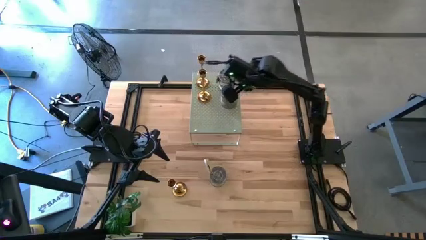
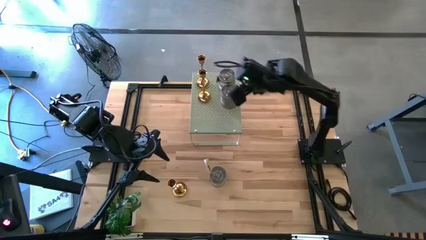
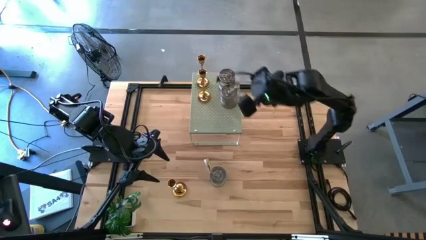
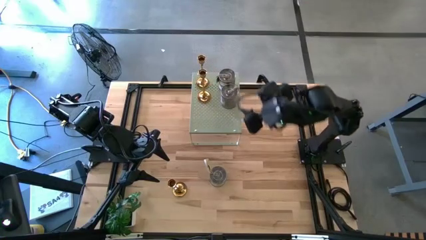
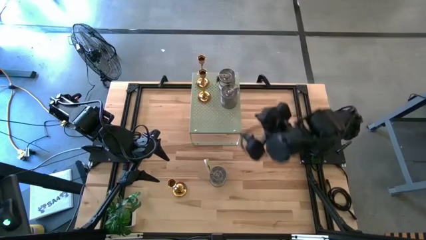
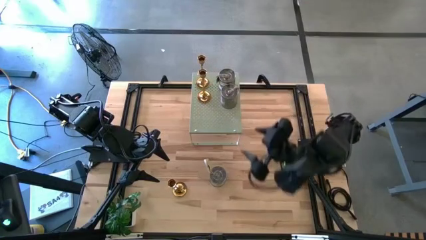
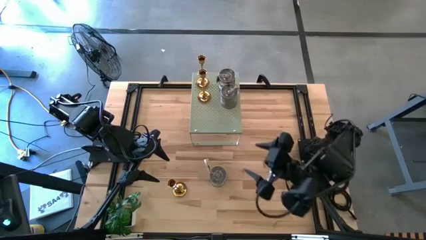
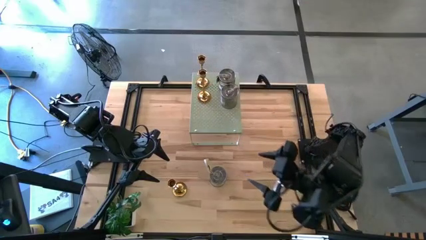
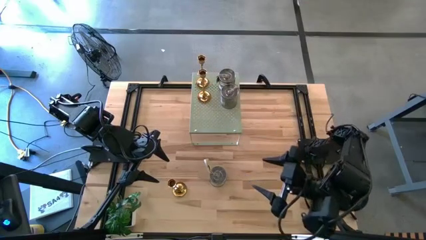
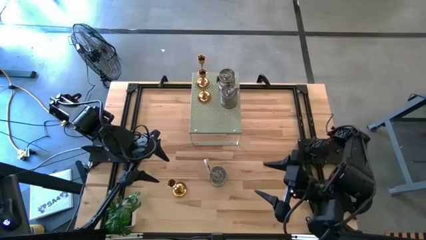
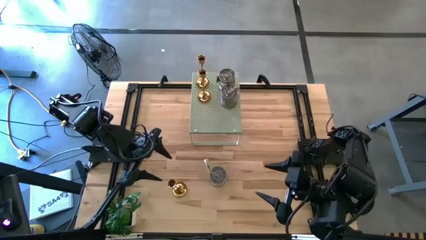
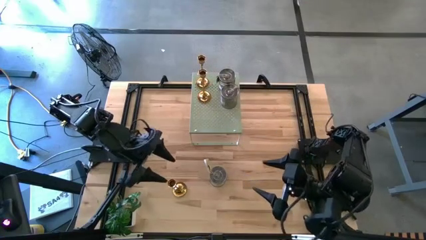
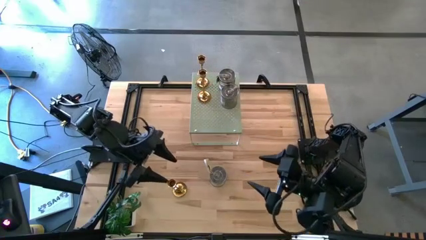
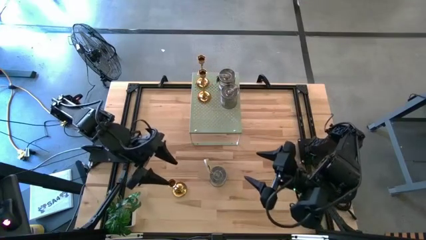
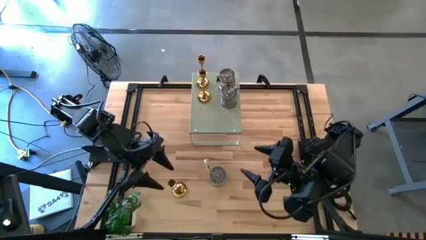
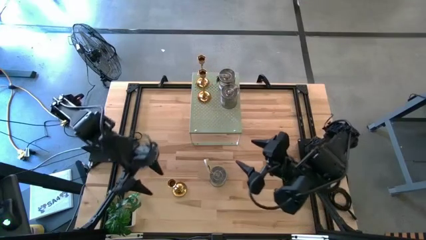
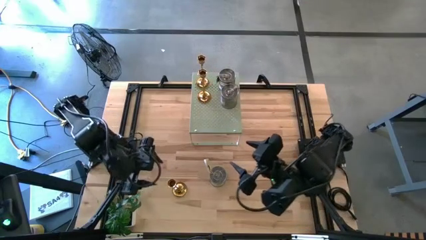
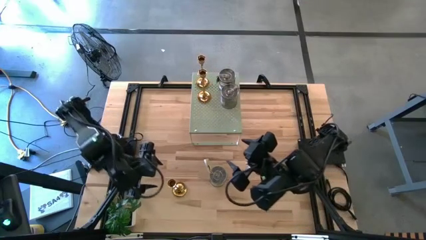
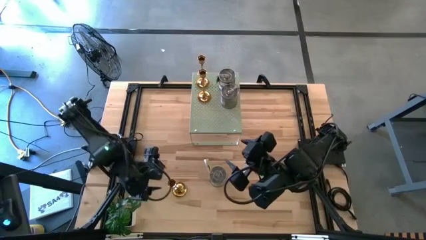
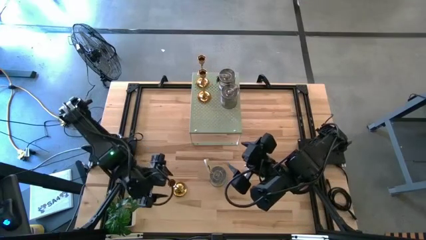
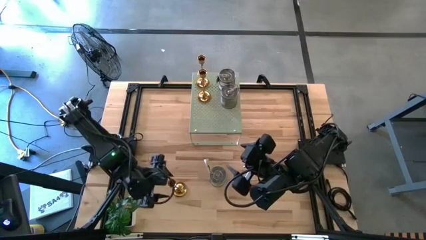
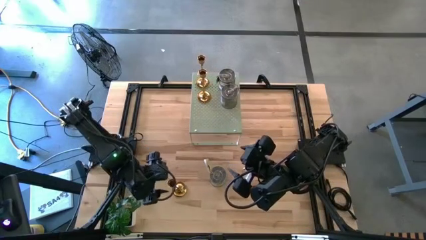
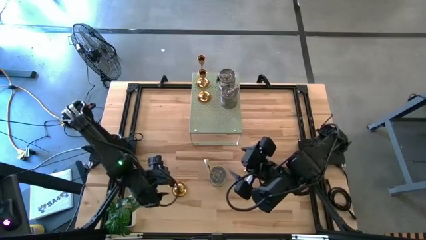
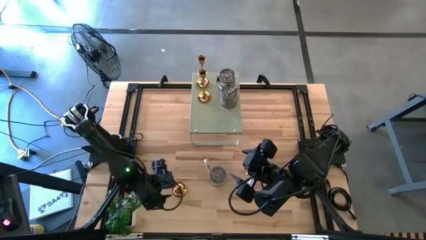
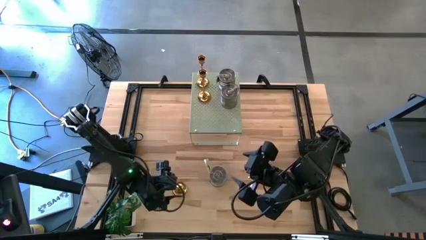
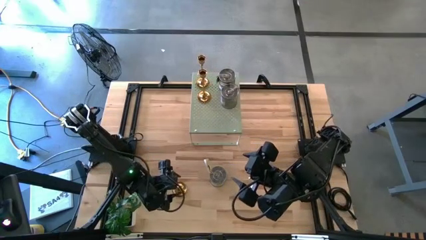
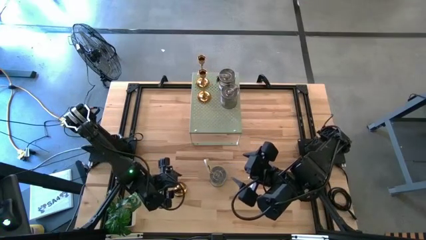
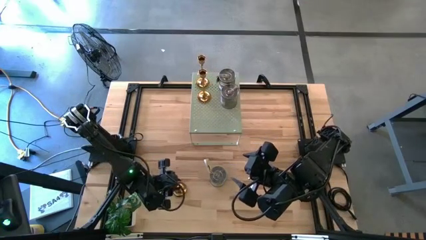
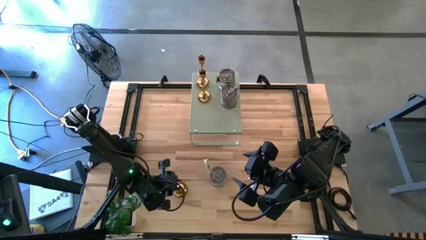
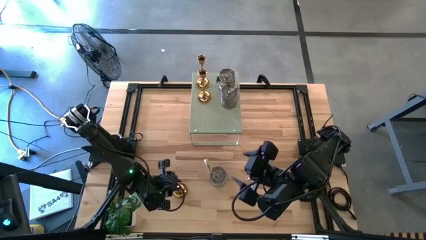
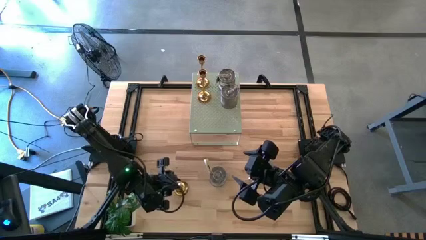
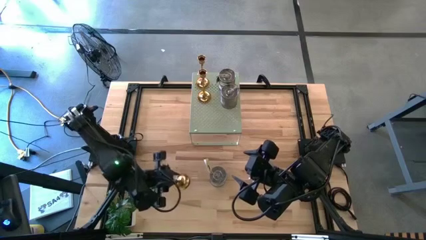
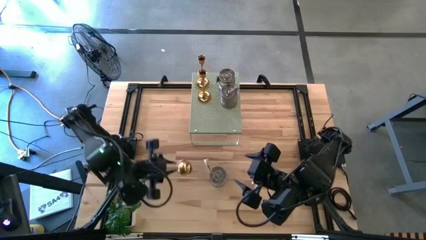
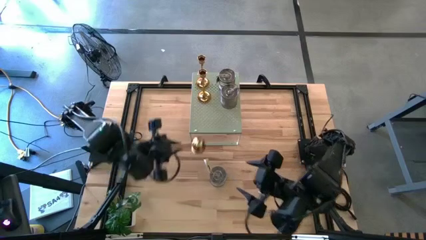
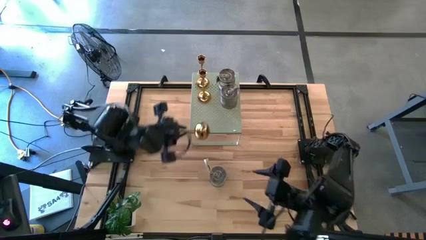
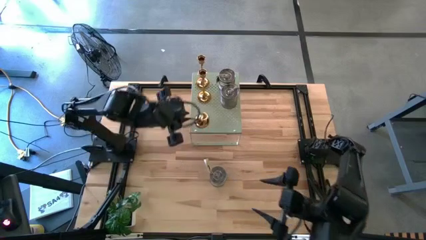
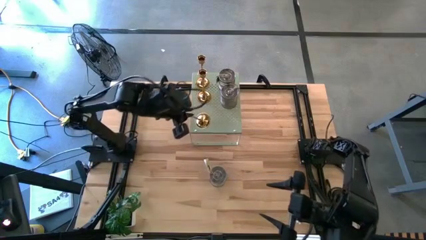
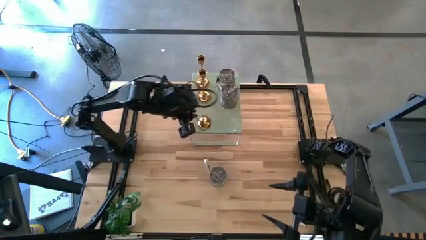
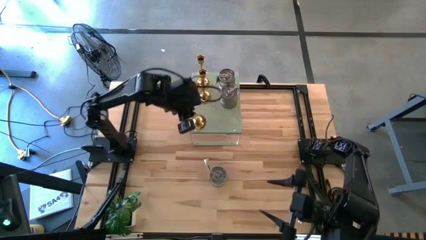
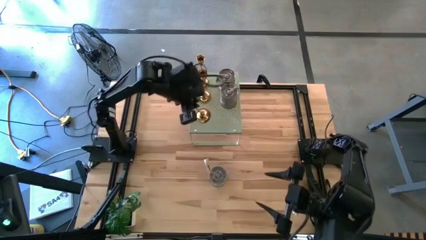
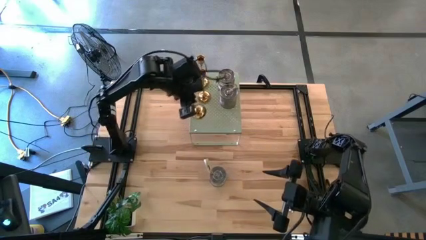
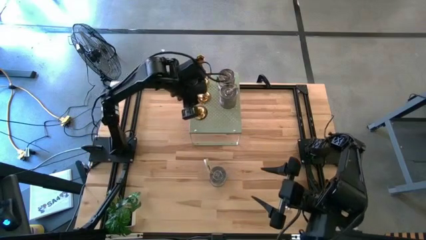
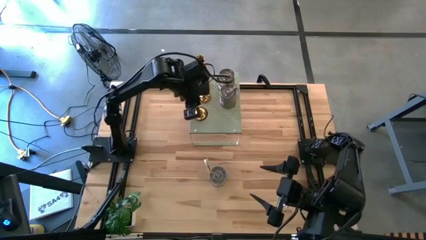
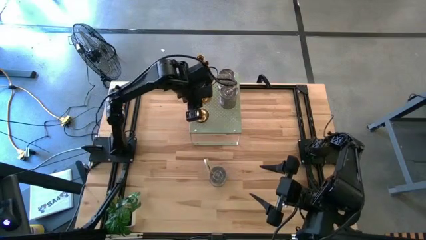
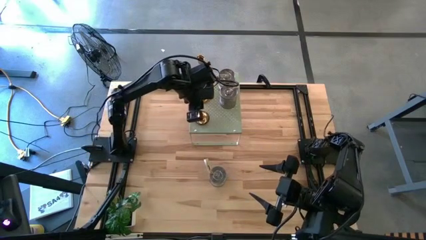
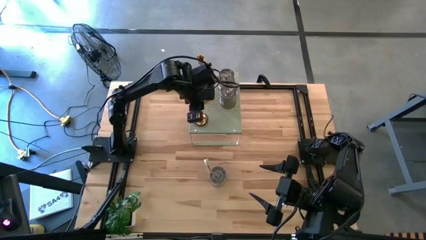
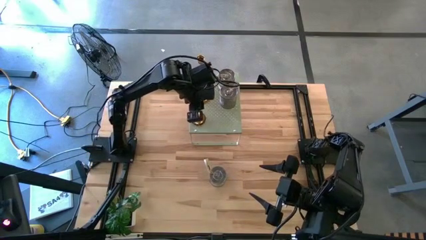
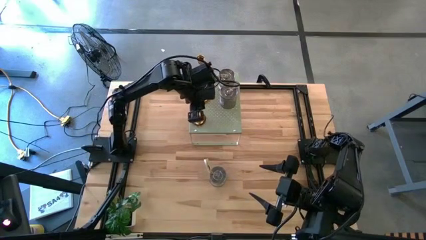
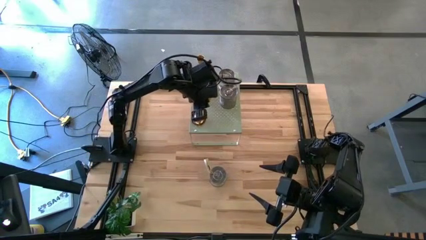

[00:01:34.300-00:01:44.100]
Task: Pick & Place candle stick holders
Put the gold candle holder on the shelf aligned with the other gold candle holder

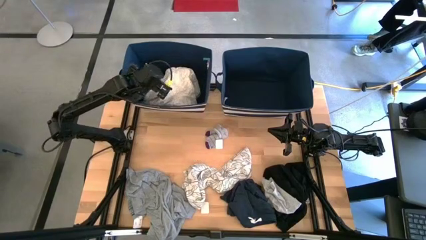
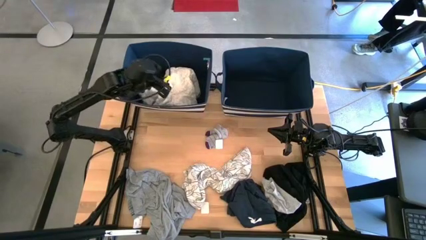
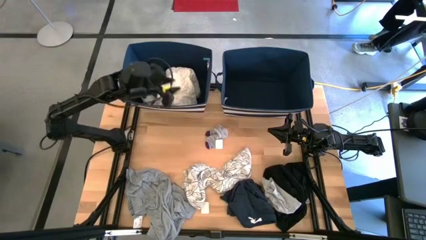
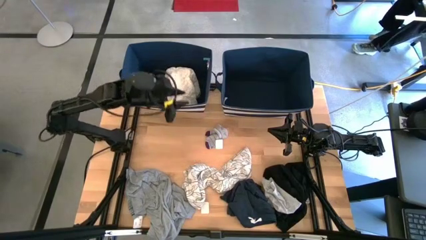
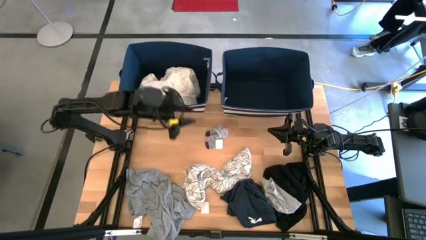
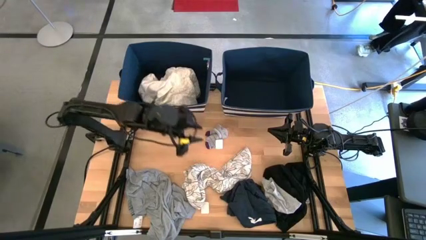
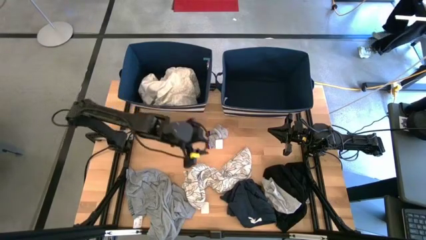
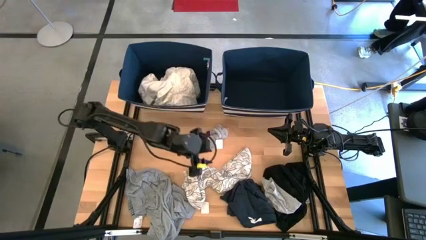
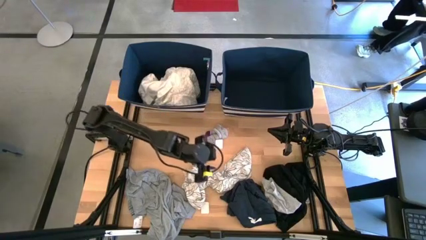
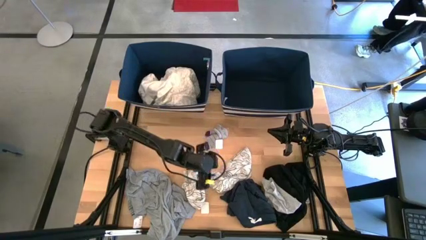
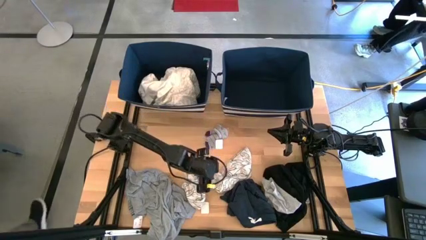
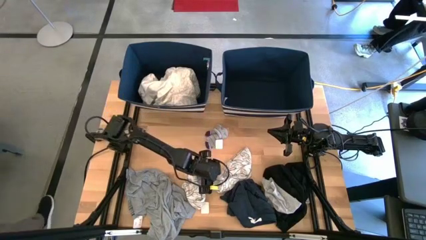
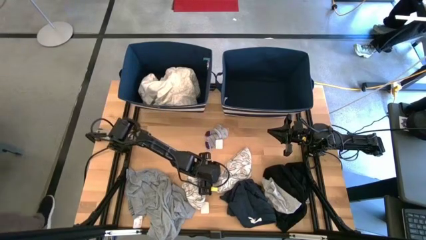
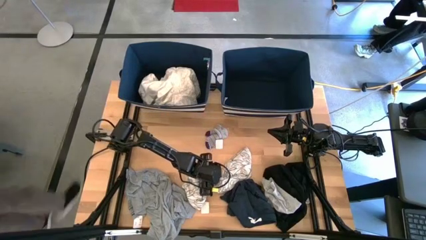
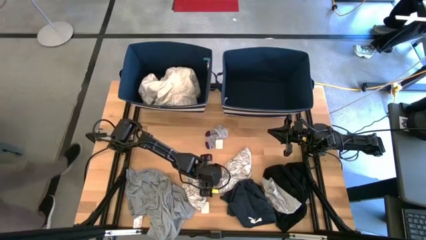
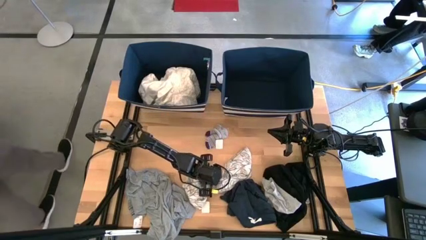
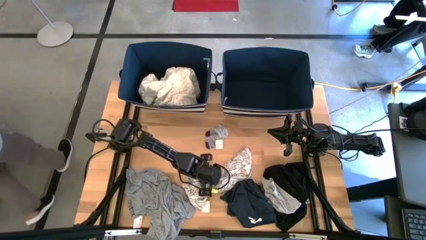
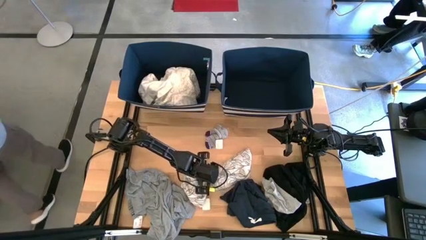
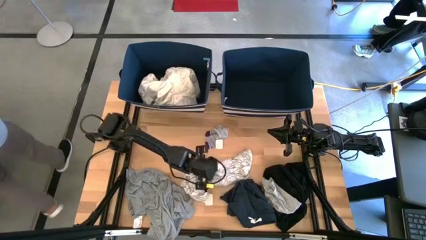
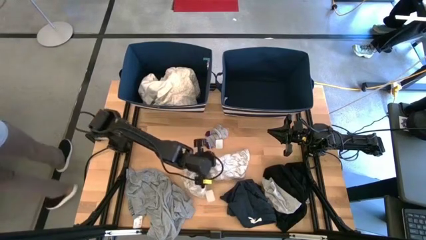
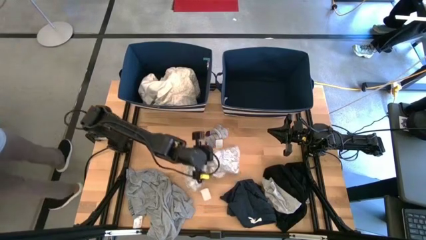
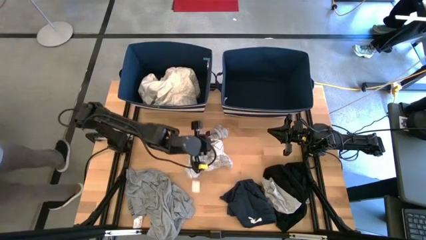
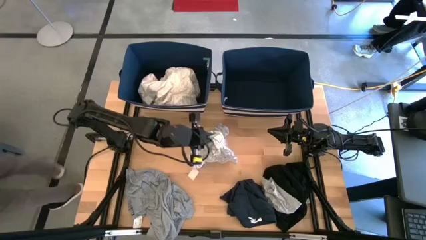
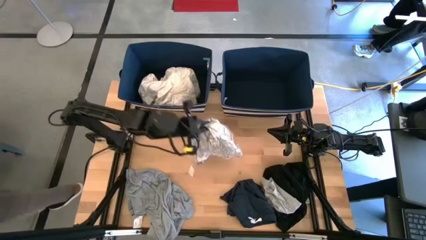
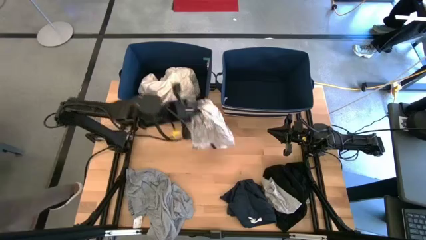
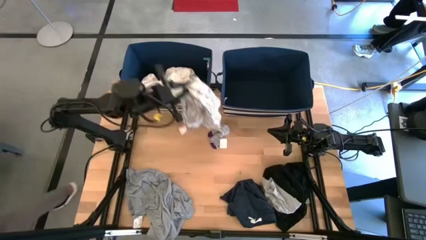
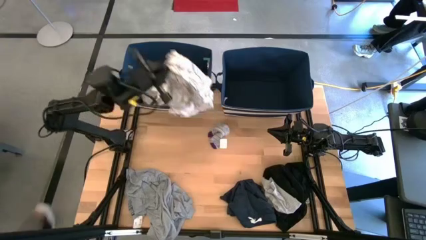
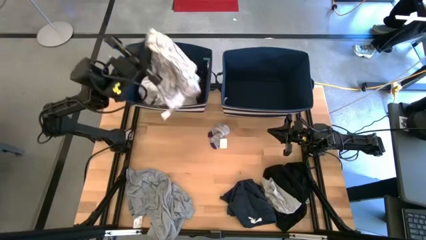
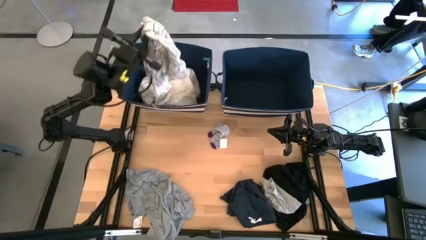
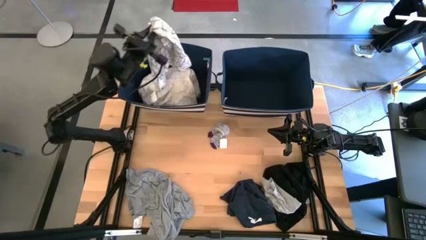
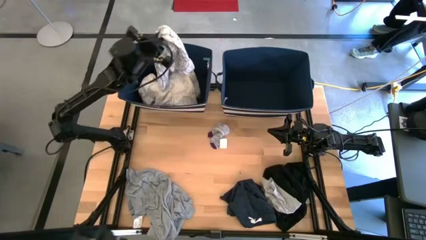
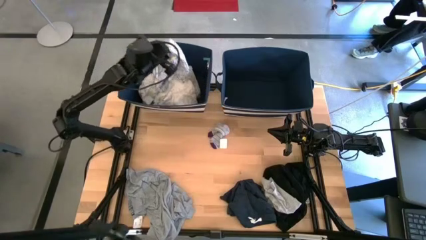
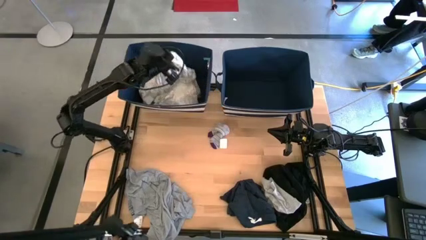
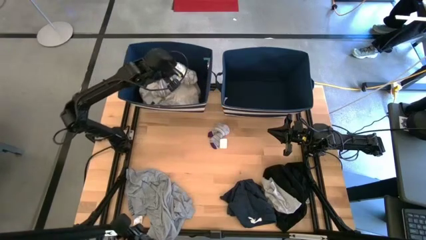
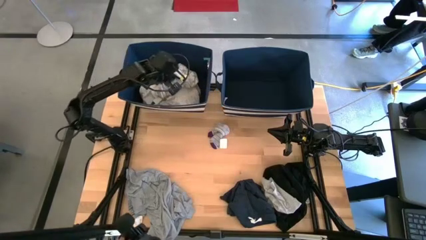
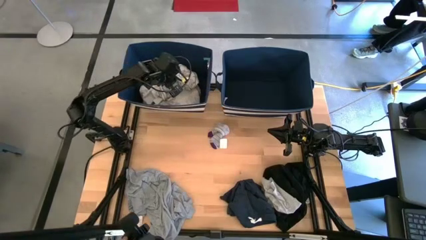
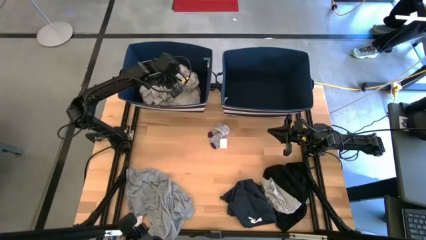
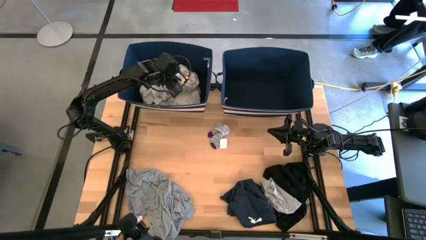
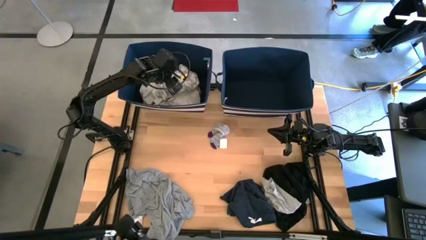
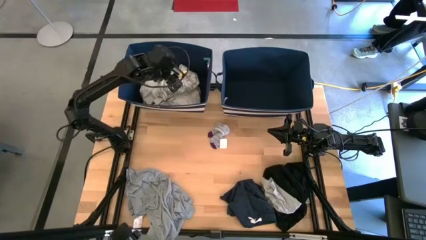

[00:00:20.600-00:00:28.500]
Task: Sort clothes
Put the white patterned shirt into the right laundry organizer
